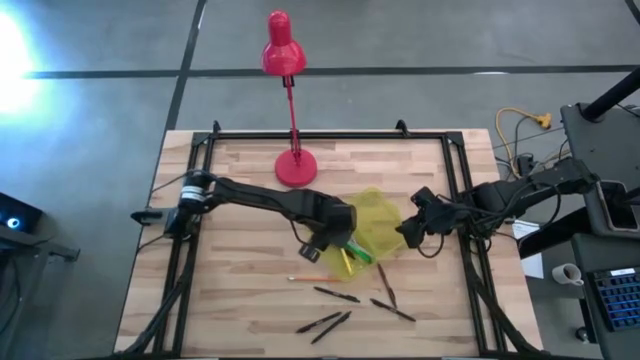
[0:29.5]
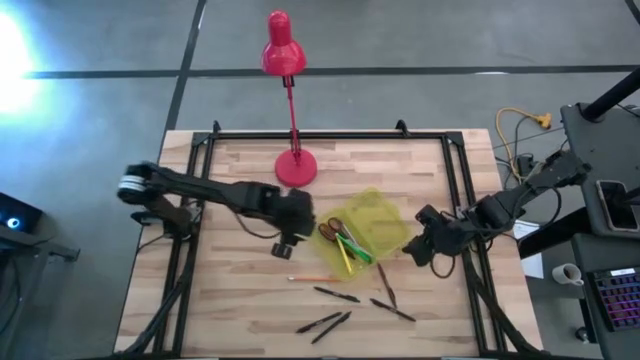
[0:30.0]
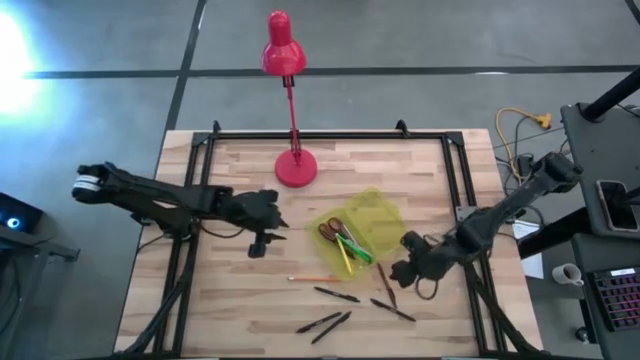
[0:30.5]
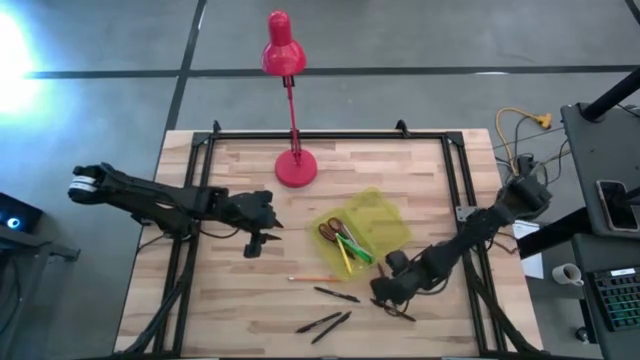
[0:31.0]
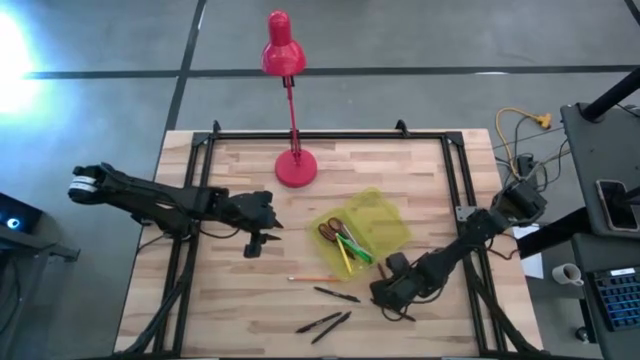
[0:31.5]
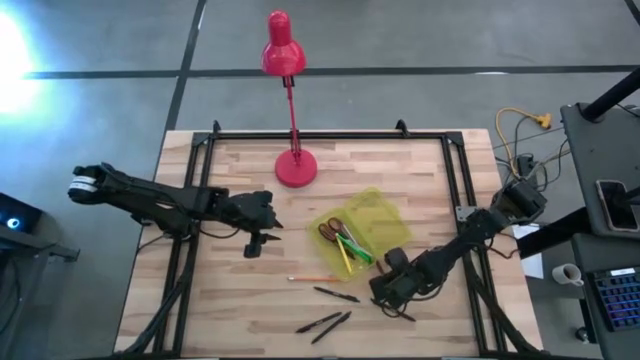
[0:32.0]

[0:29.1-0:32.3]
Task: Pick & place school supplies into a supply box
Put the brown pen into the yellow supply box

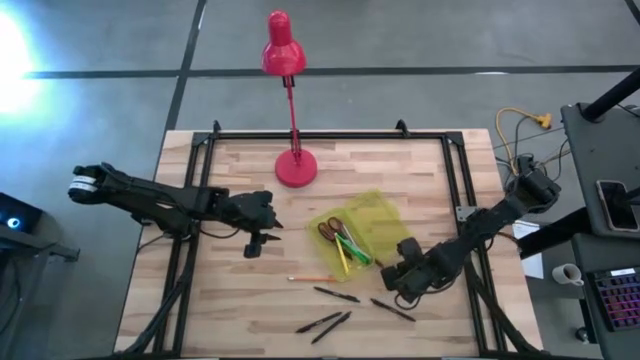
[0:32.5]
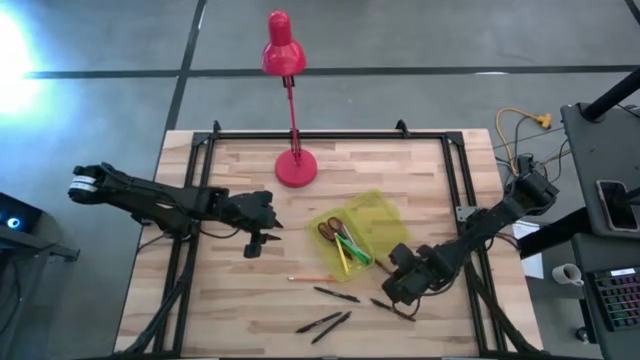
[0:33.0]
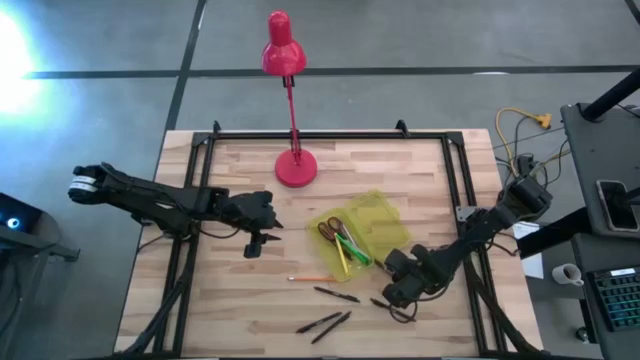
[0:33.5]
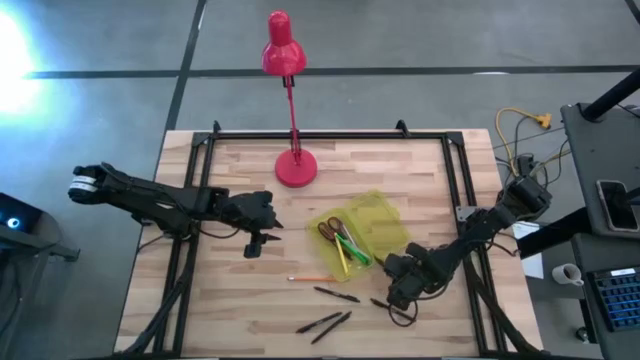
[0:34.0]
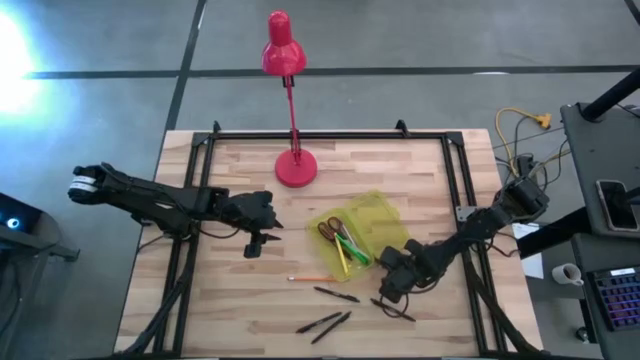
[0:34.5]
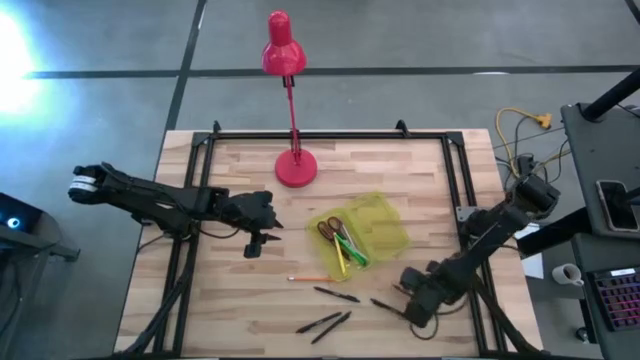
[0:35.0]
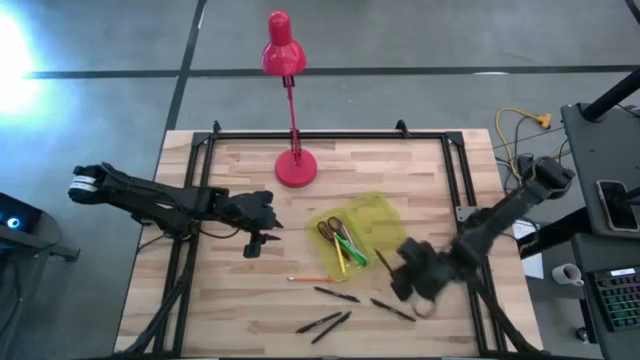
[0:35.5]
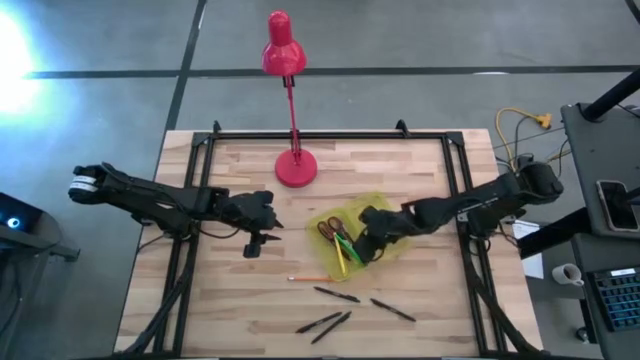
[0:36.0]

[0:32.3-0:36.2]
Put the brown pen into the yellow supply box

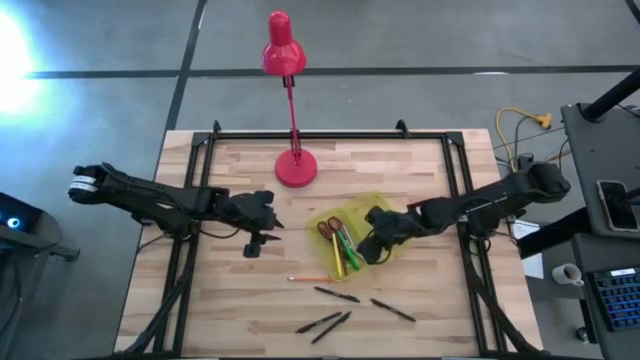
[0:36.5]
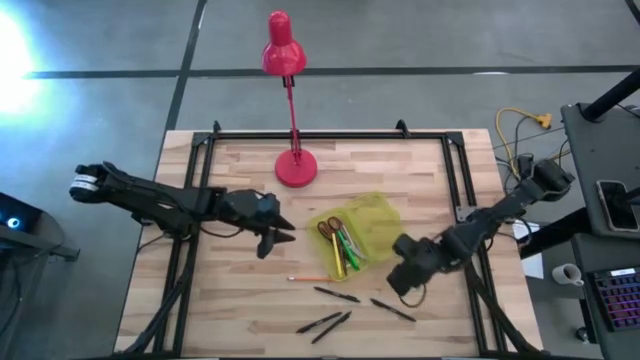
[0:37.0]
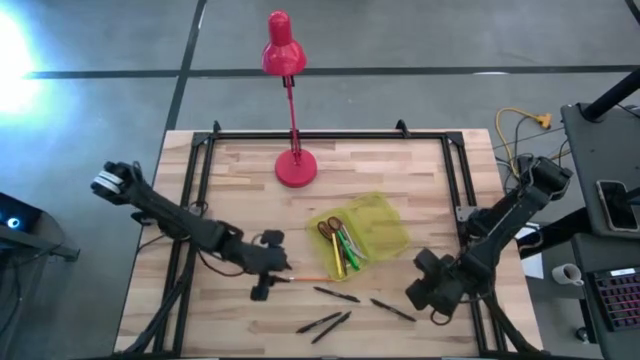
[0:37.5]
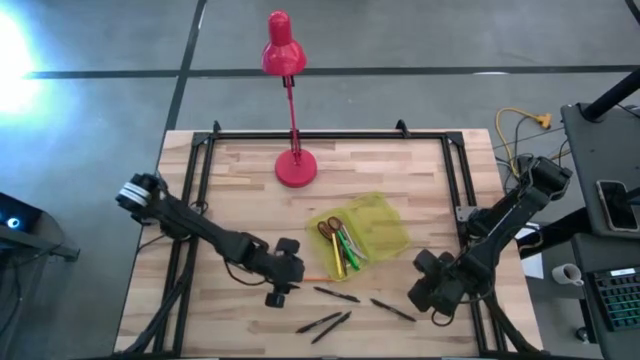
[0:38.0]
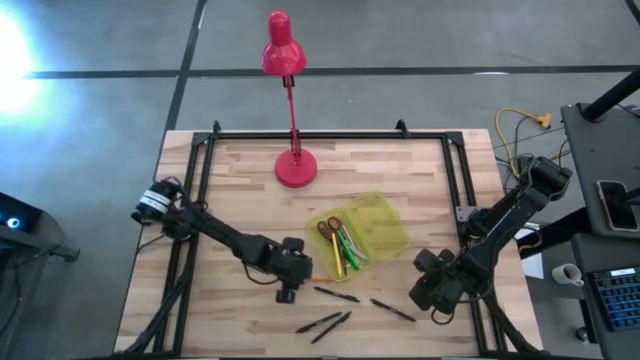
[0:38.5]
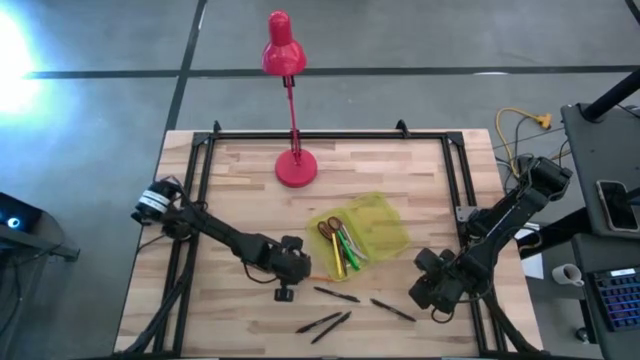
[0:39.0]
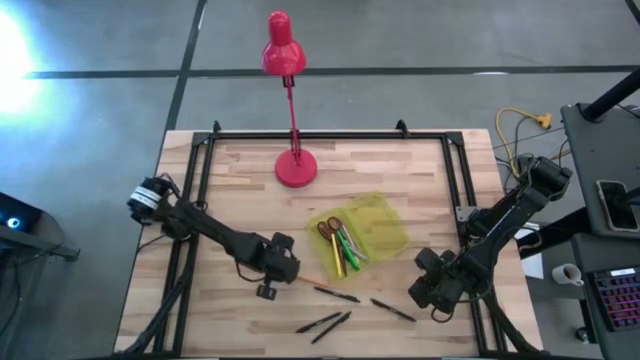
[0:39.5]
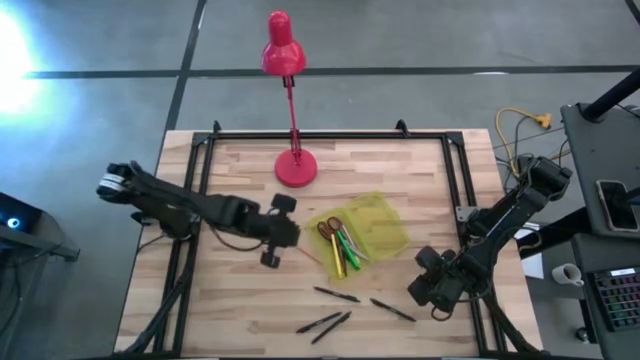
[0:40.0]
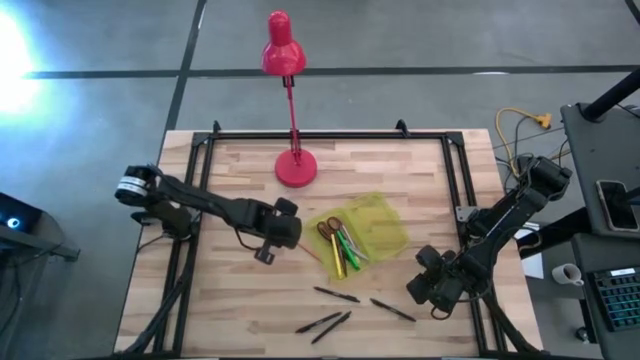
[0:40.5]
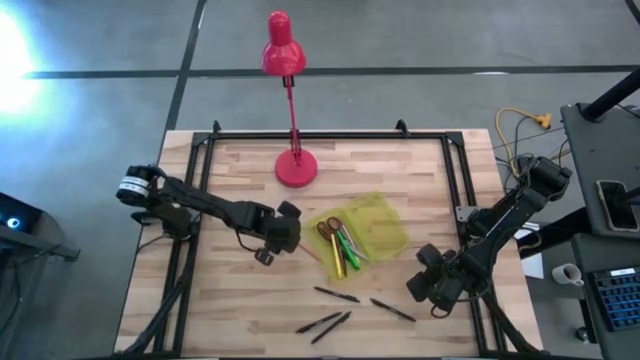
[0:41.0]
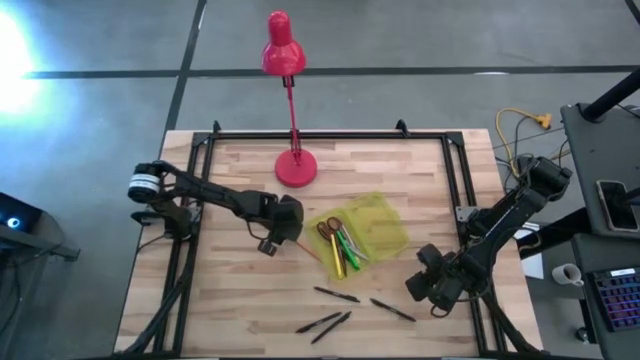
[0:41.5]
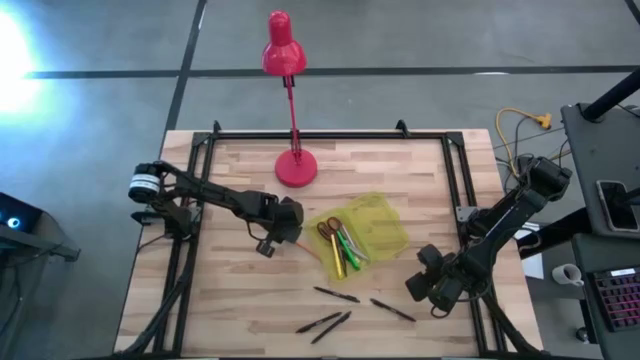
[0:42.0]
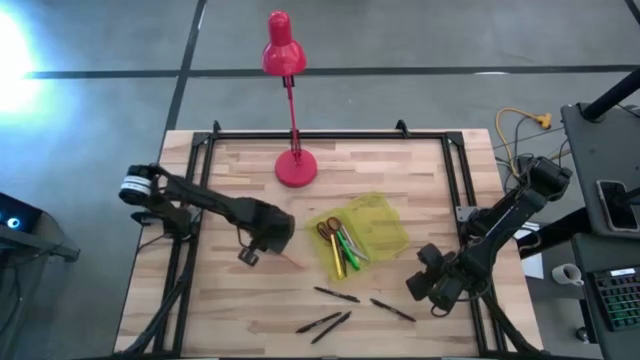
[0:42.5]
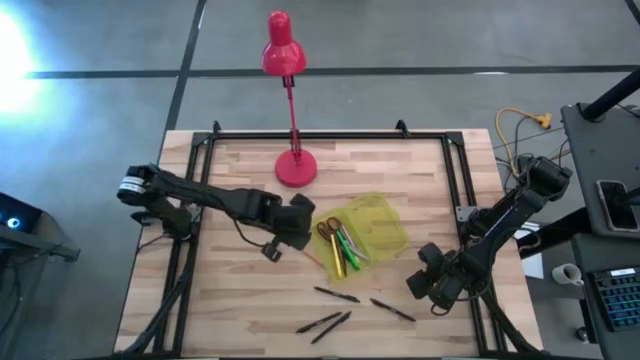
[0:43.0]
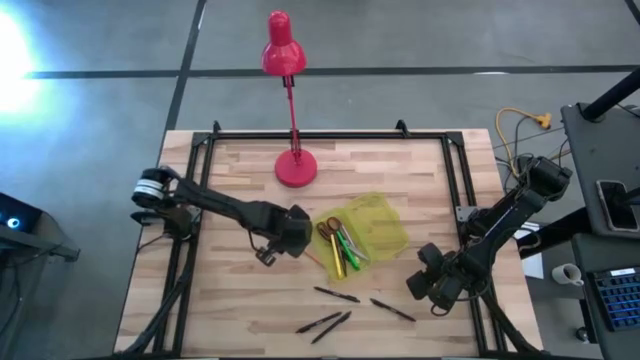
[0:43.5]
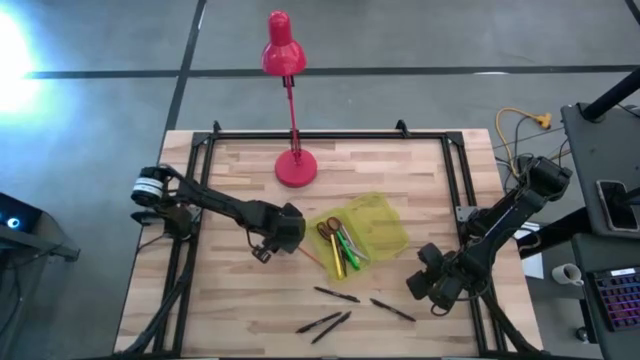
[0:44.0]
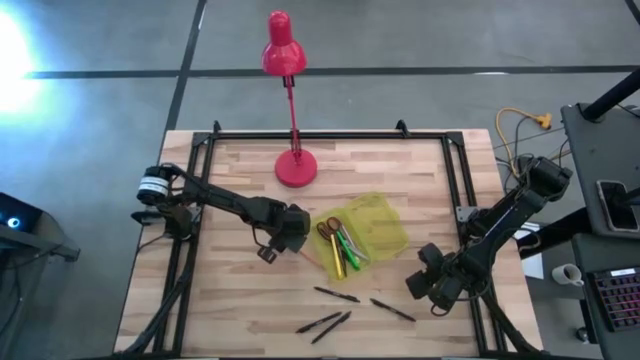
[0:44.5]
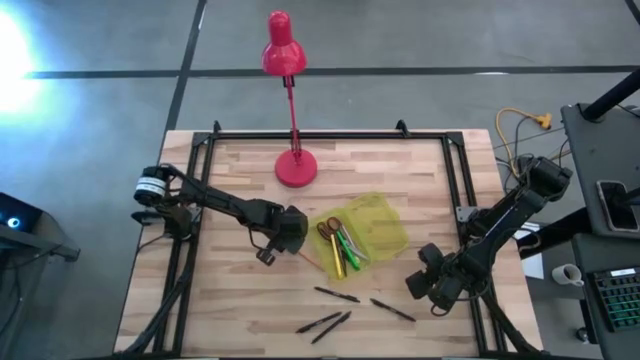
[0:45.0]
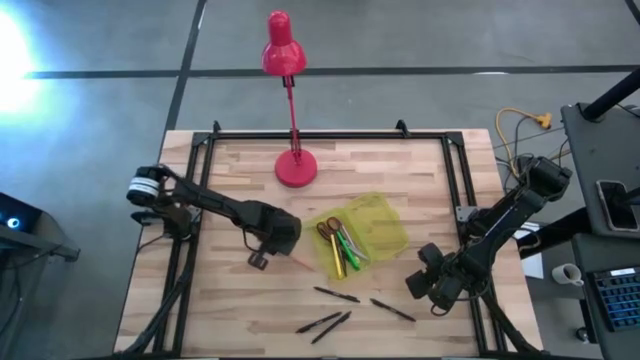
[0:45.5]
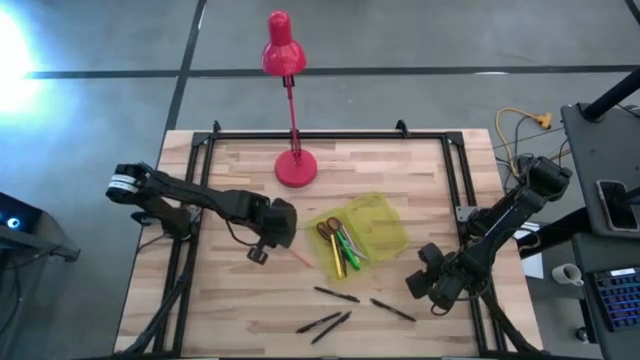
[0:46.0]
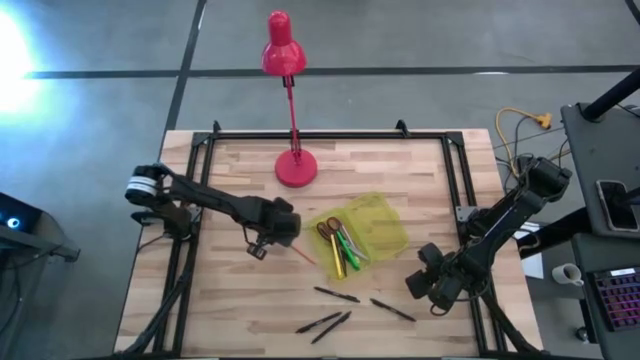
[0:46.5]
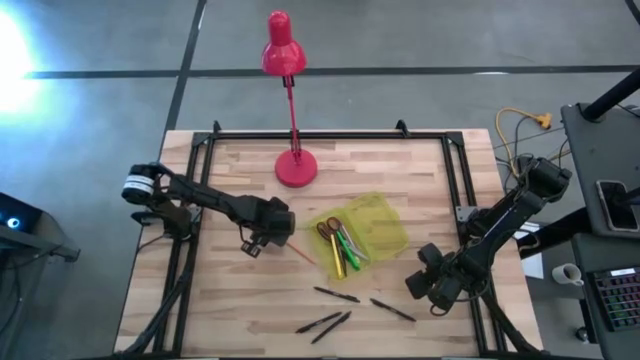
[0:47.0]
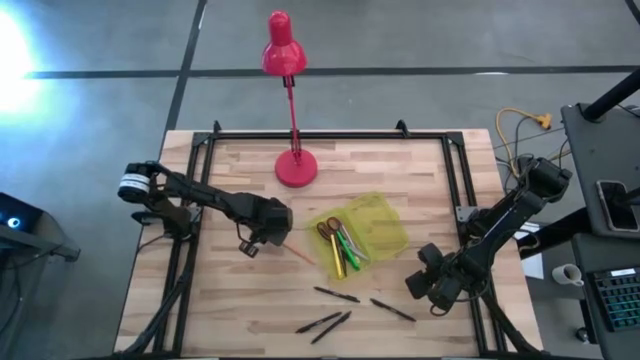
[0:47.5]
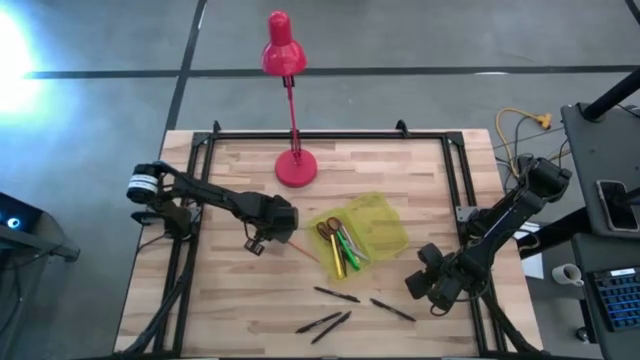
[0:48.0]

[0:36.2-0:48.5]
Put the orange pencil into the yellow supply box

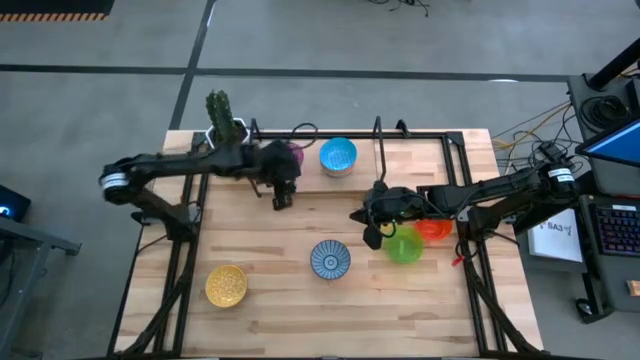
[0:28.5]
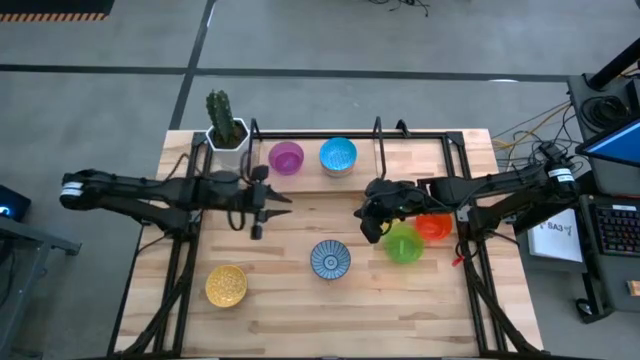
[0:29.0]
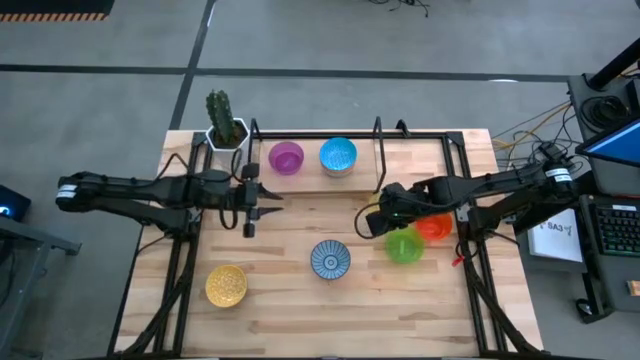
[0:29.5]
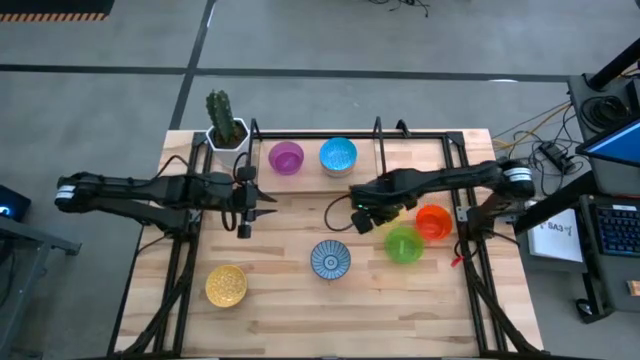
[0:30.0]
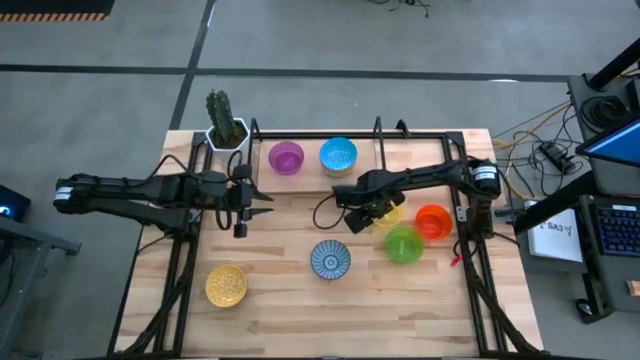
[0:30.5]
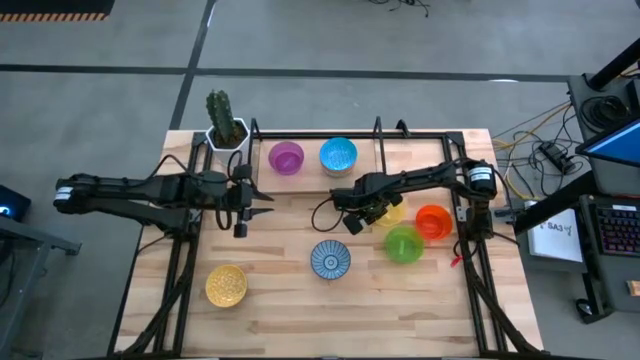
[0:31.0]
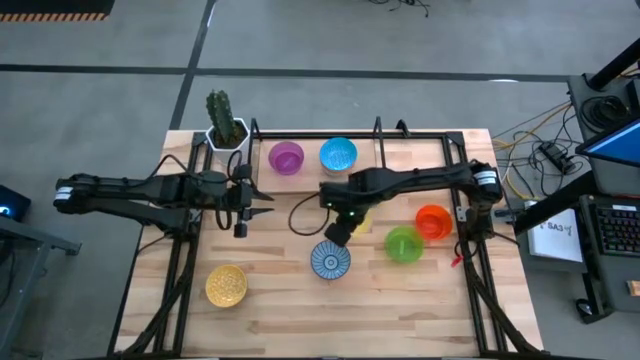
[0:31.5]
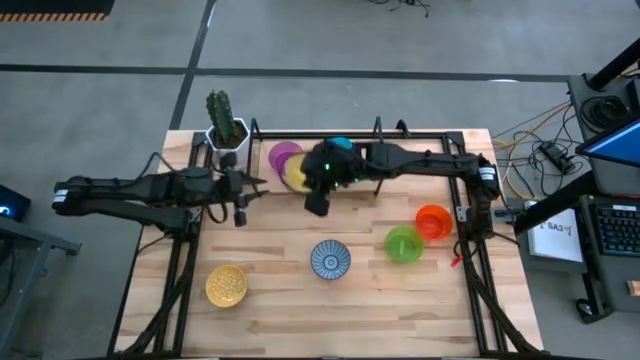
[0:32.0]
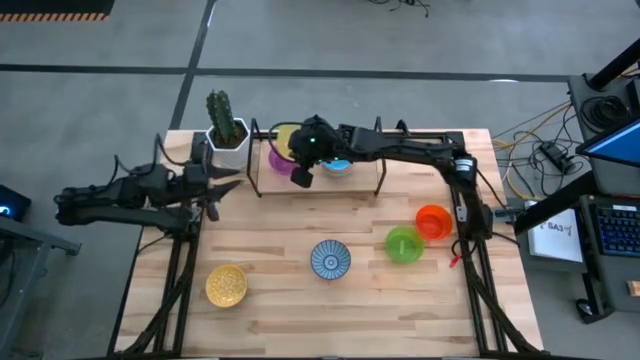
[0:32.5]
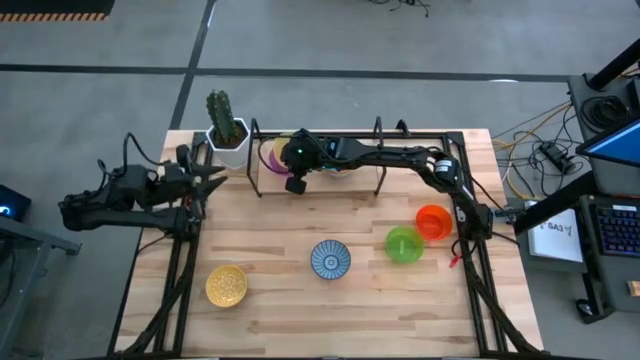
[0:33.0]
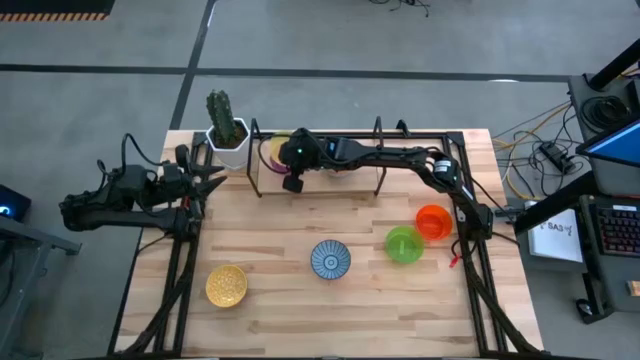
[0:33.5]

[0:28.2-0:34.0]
Task: Place and stack bowls onto a shelf
Stack the yellow bowl on top of the violet bowl on the shelf
